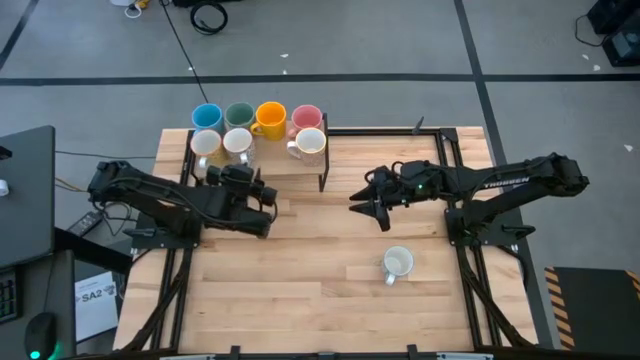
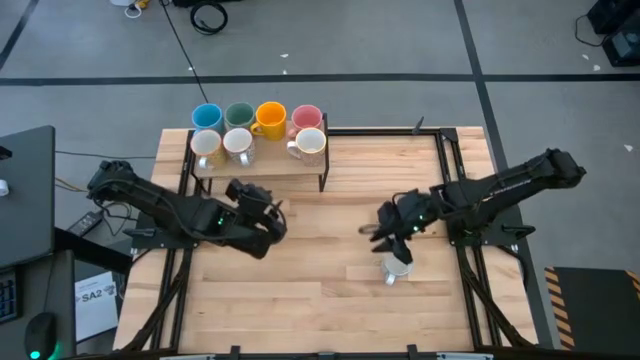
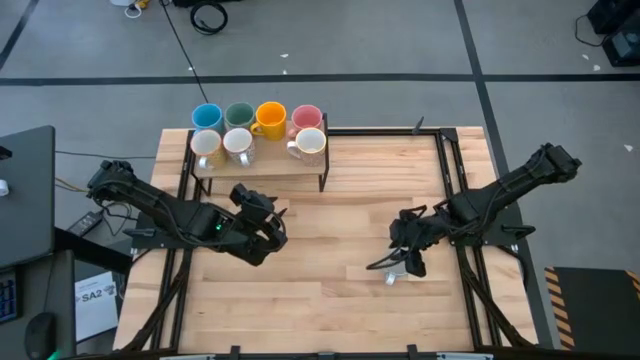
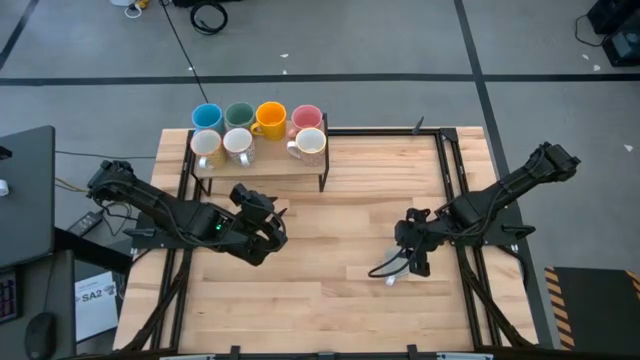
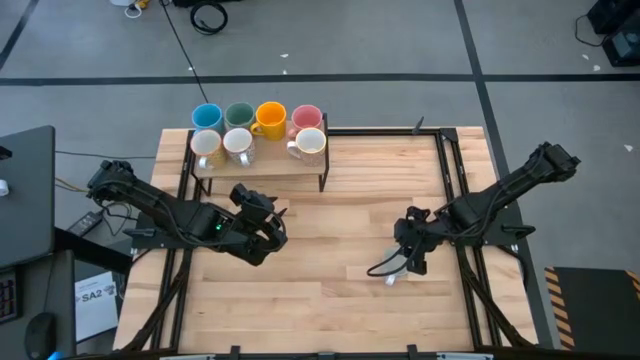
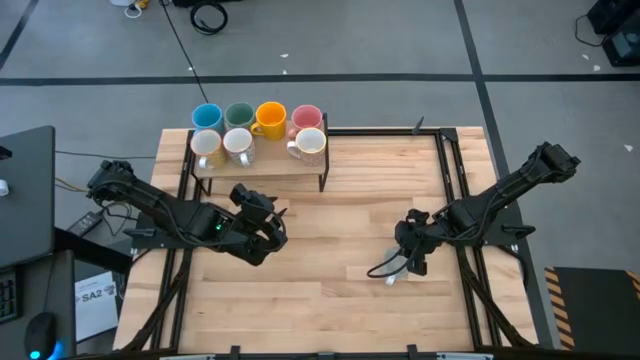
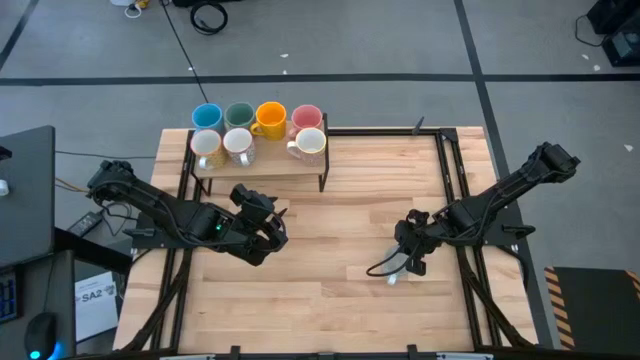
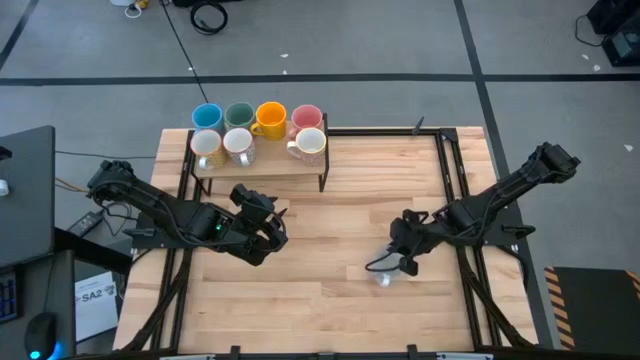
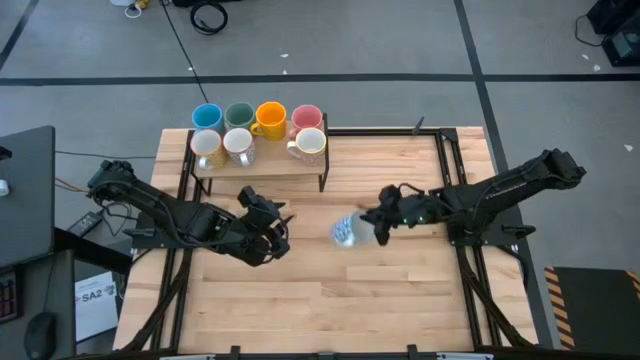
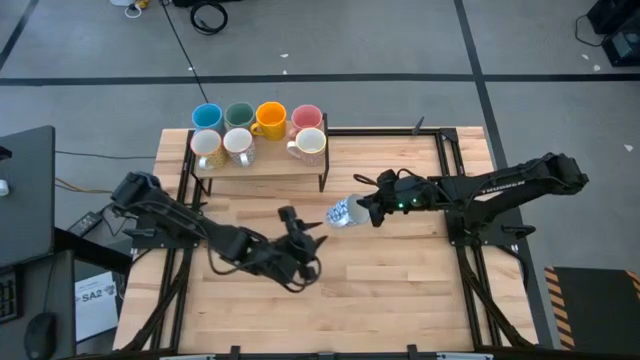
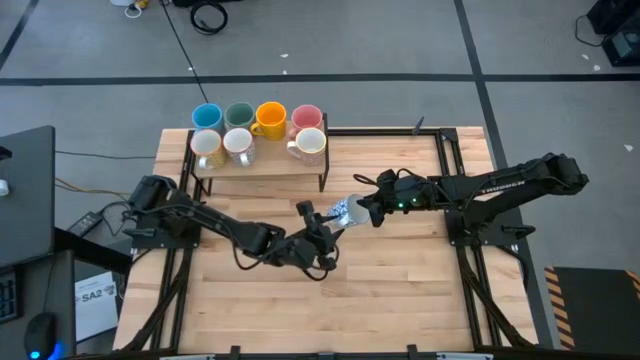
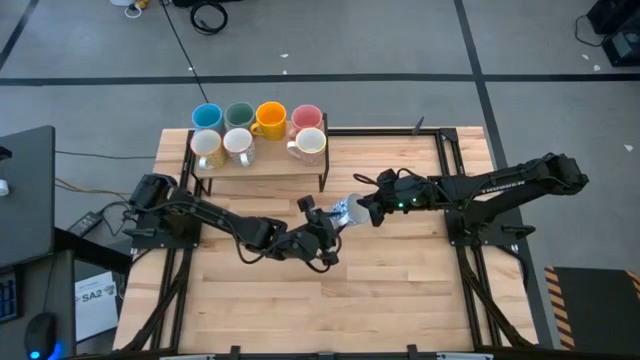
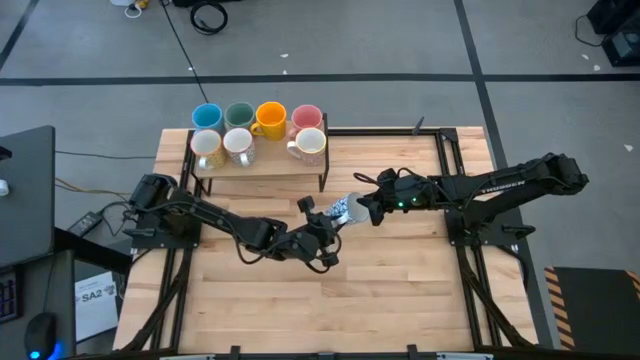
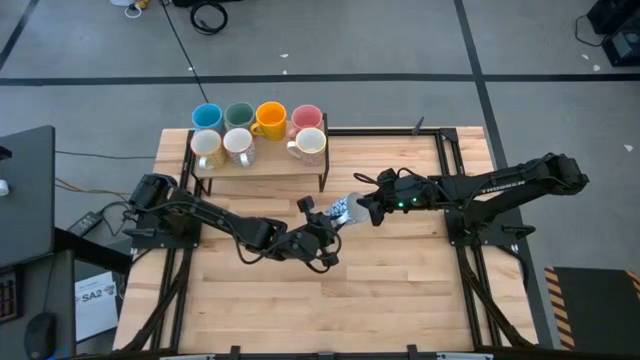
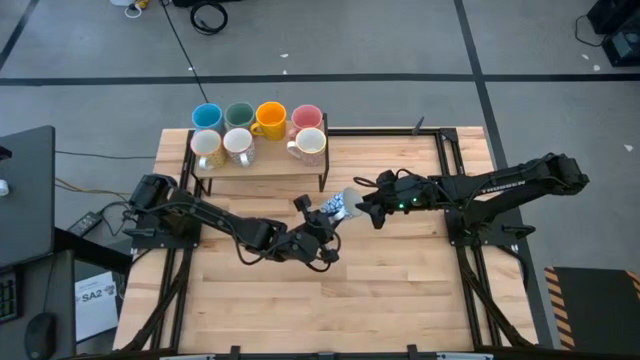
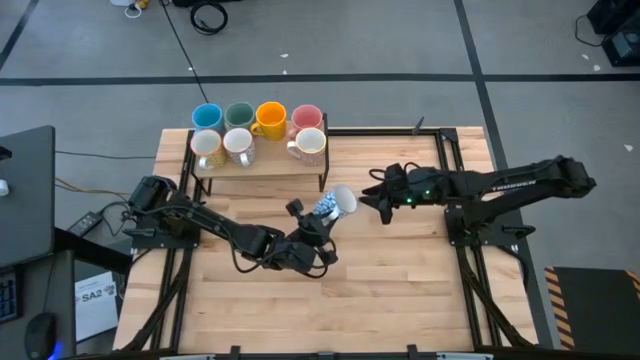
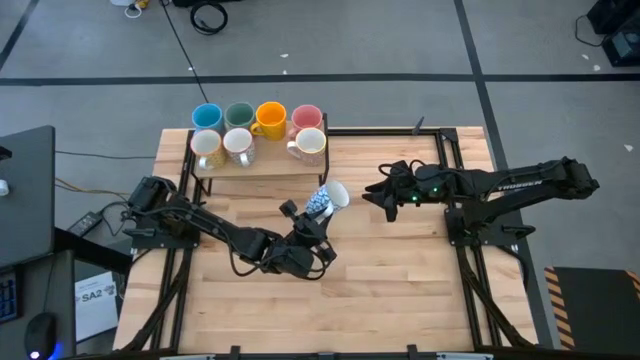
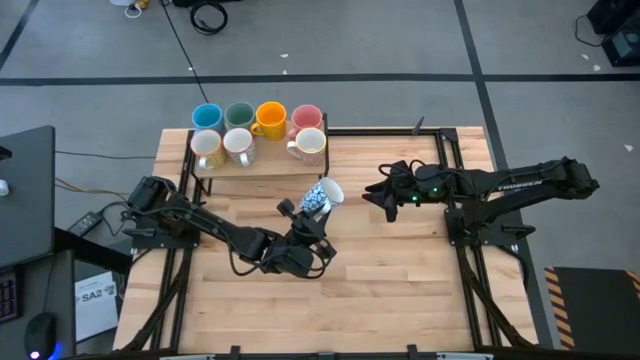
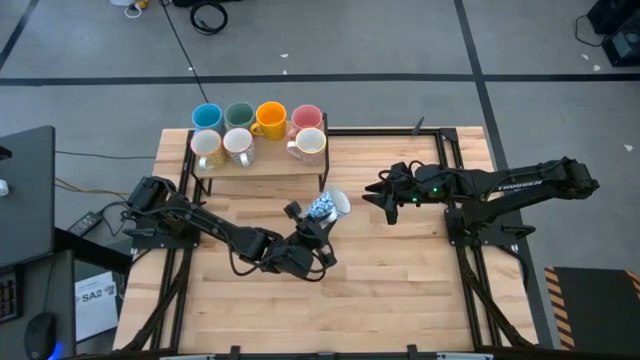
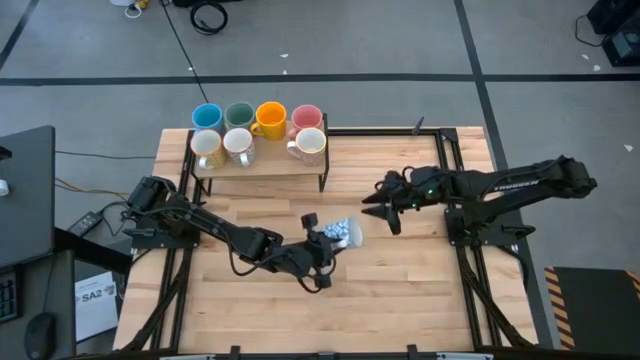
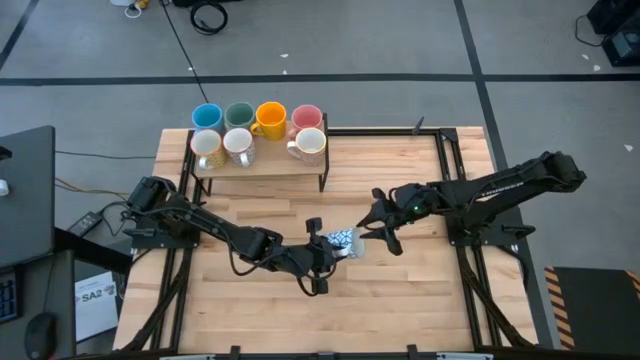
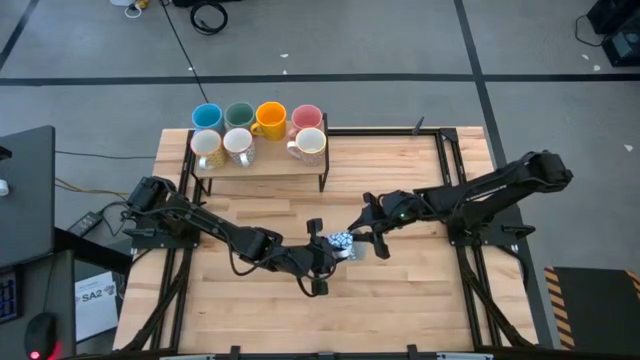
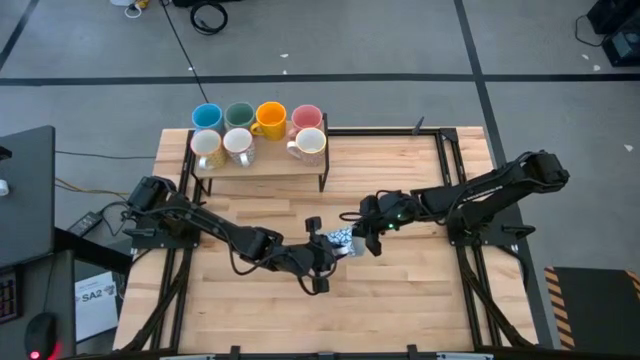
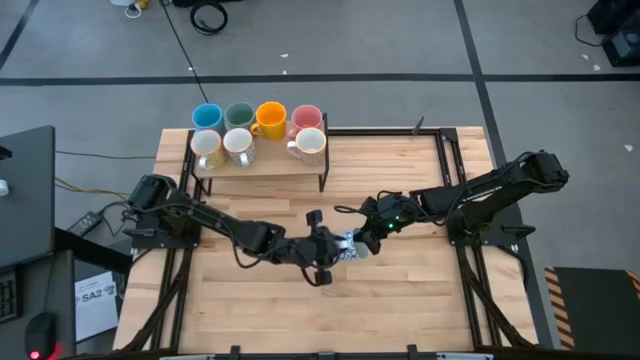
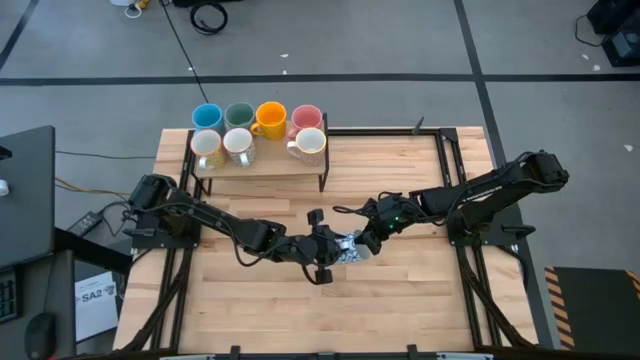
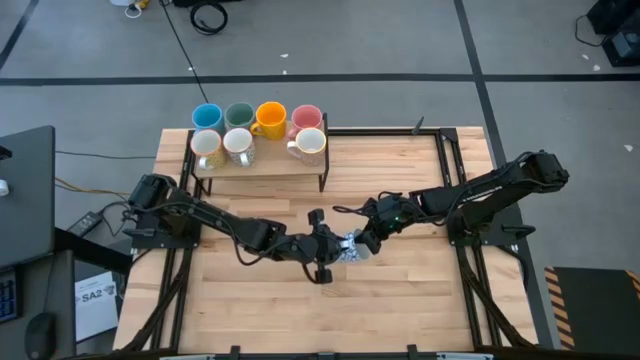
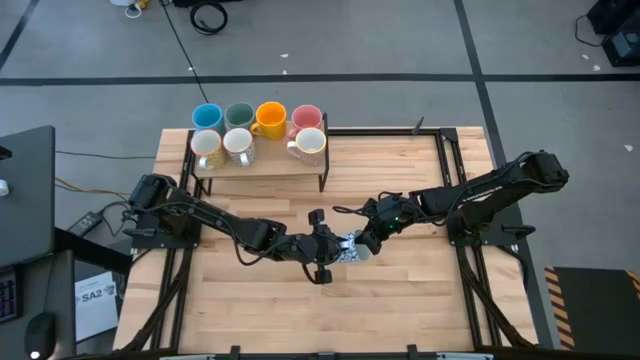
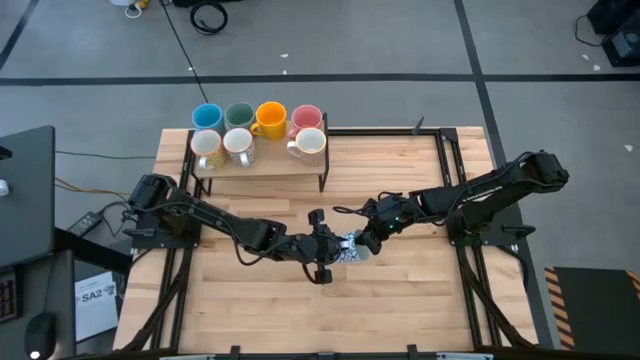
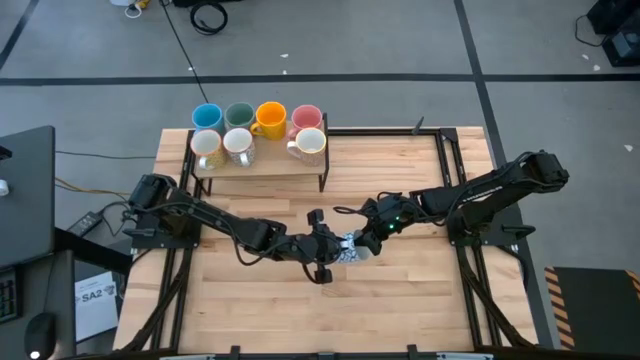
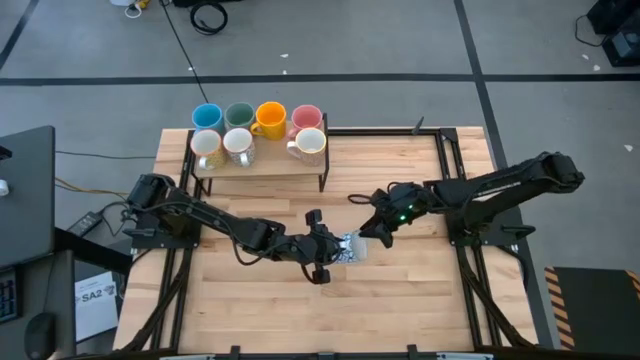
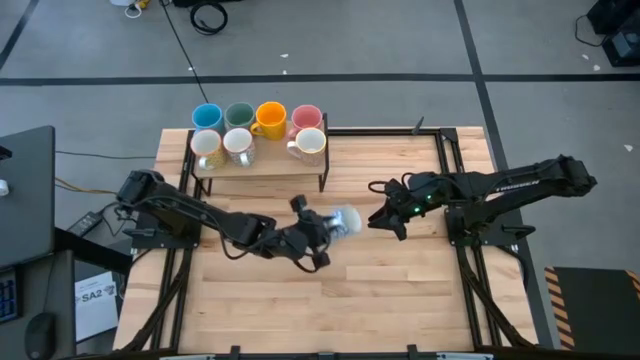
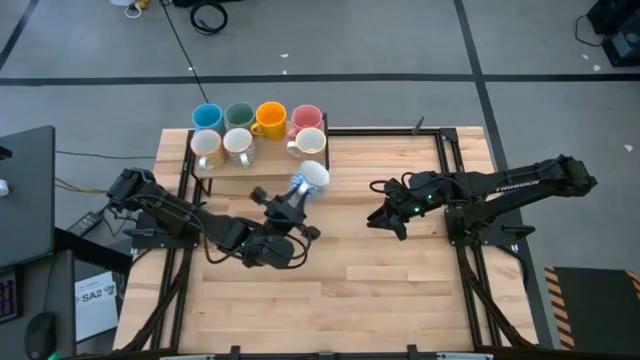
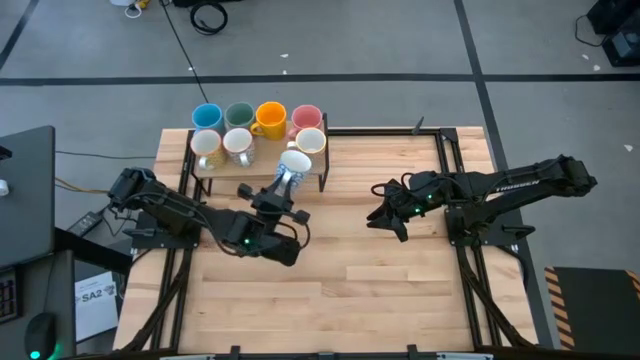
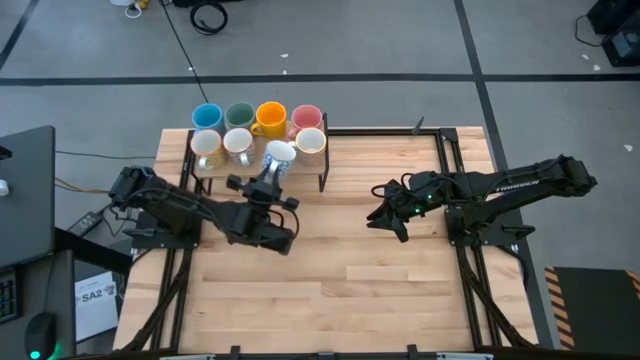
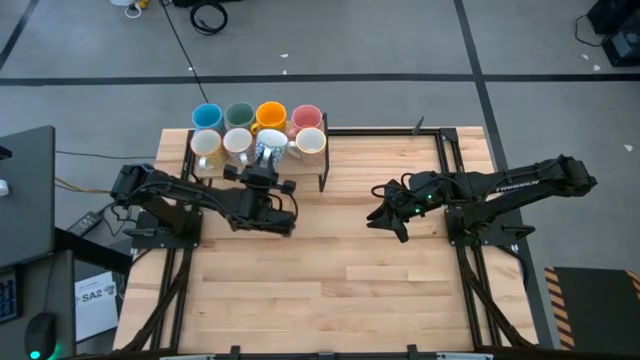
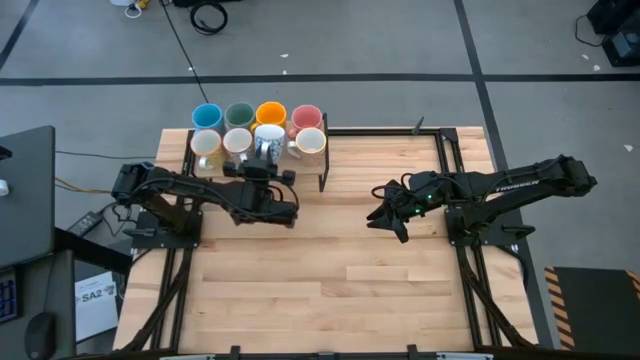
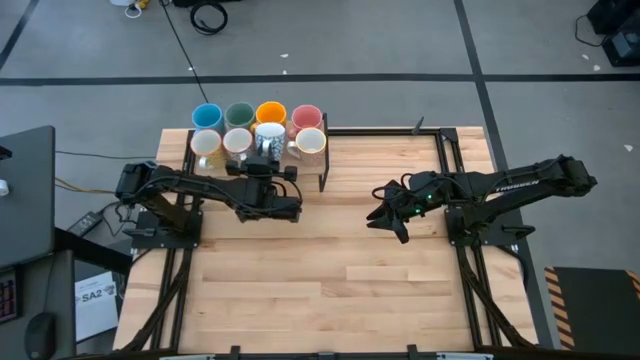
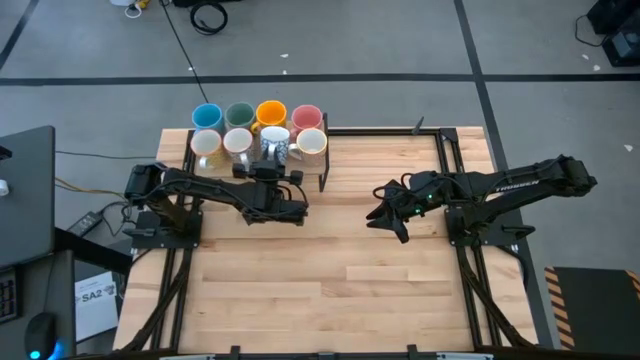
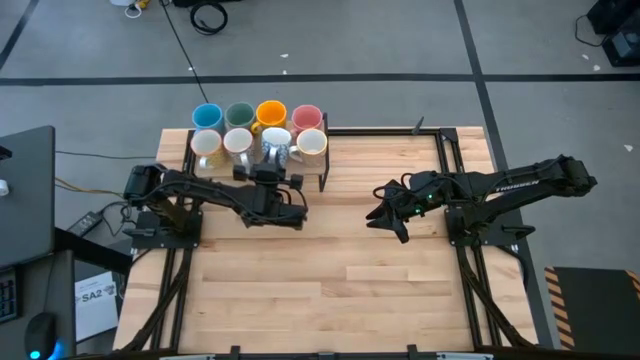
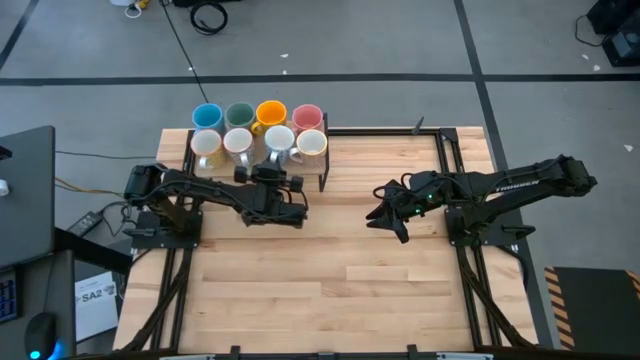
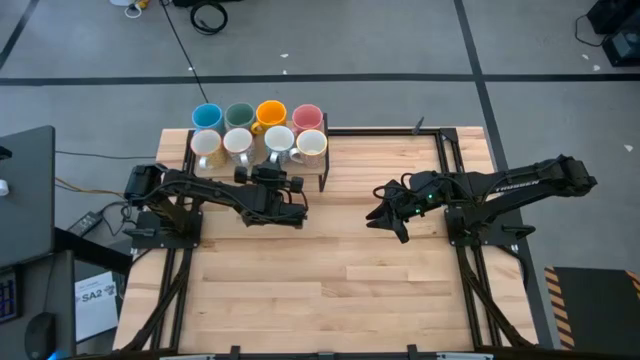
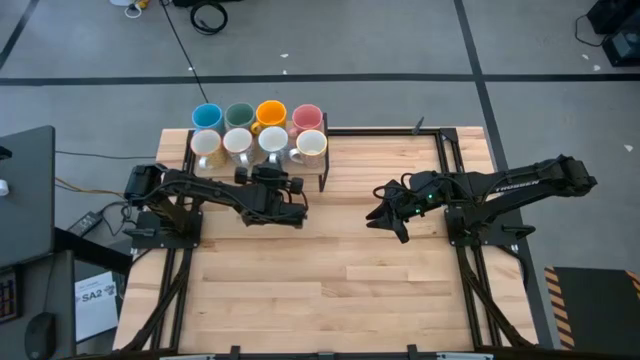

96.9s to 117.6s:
Task: Place coffee mugs
Put the blue patterned mug on the shelf
